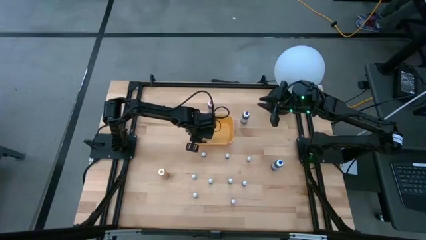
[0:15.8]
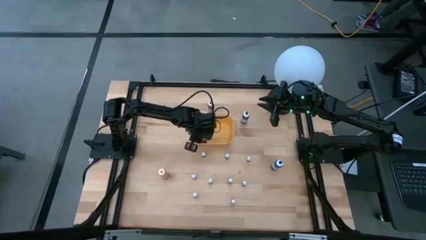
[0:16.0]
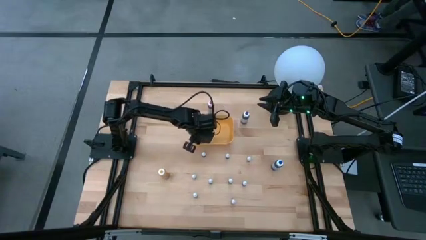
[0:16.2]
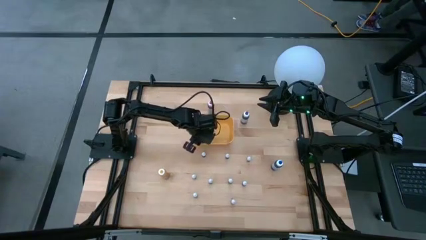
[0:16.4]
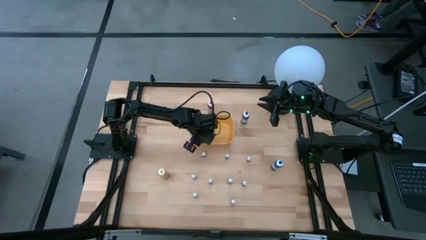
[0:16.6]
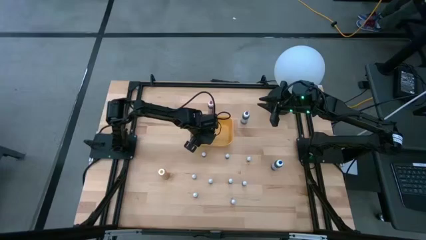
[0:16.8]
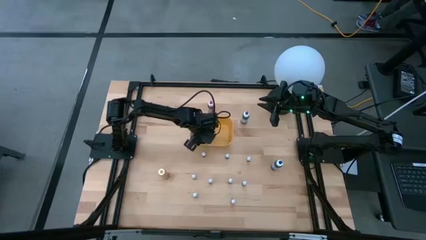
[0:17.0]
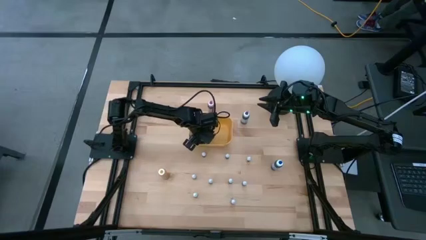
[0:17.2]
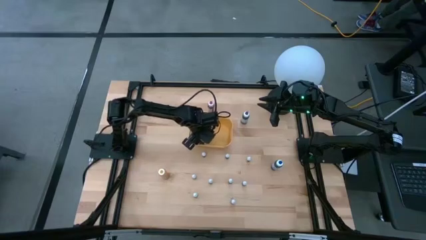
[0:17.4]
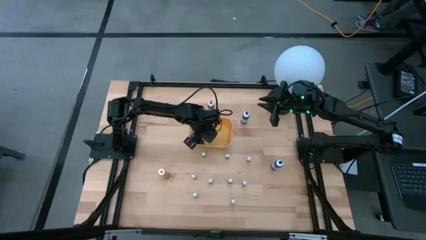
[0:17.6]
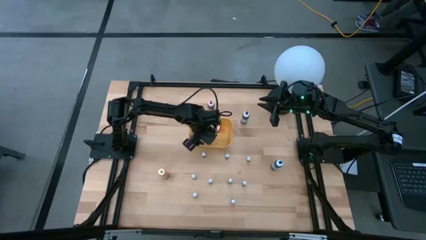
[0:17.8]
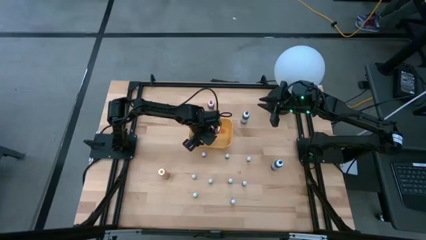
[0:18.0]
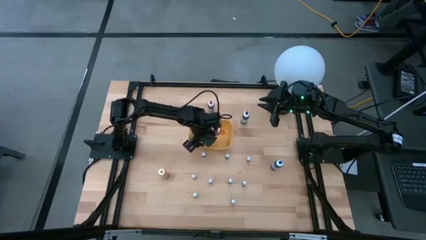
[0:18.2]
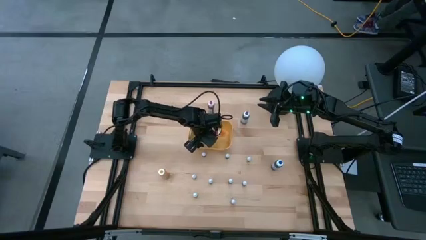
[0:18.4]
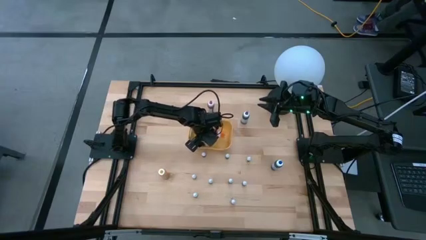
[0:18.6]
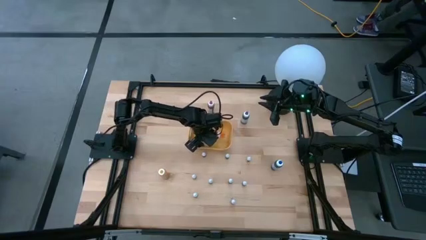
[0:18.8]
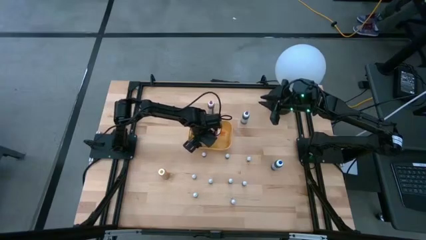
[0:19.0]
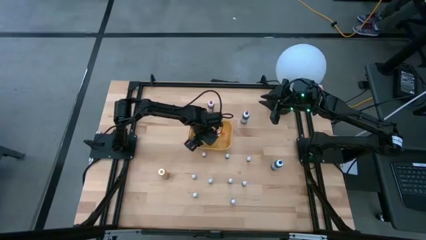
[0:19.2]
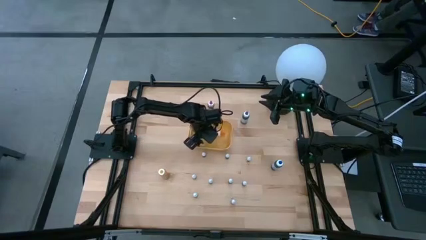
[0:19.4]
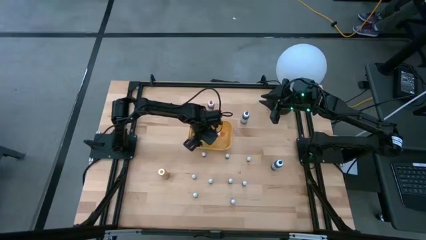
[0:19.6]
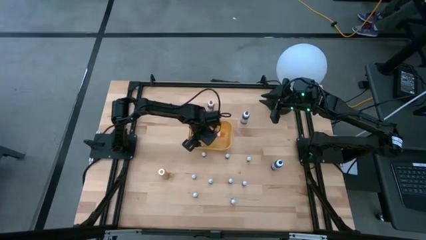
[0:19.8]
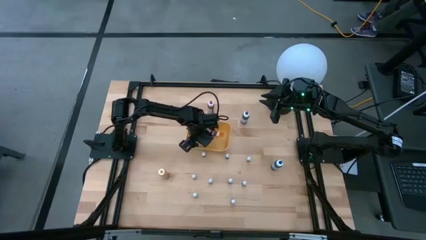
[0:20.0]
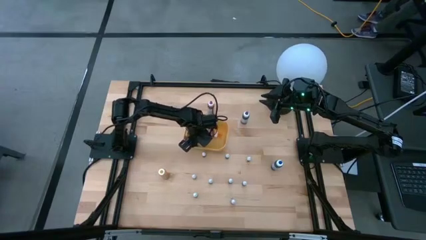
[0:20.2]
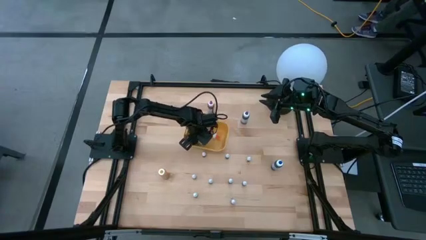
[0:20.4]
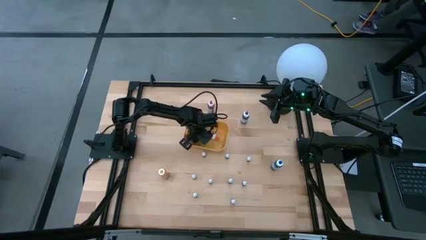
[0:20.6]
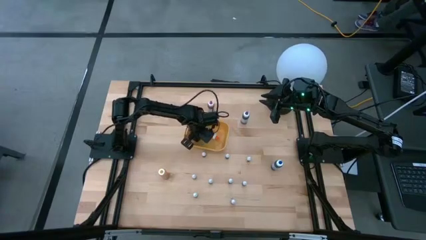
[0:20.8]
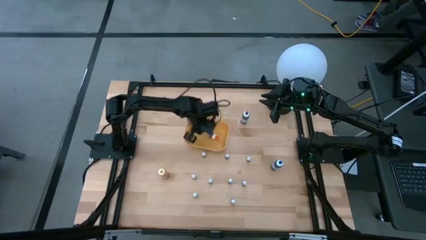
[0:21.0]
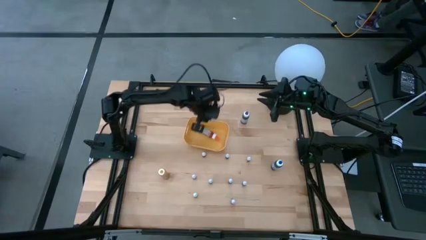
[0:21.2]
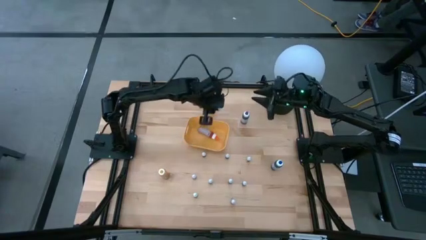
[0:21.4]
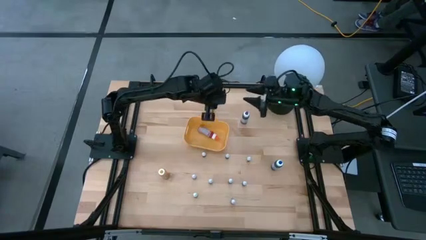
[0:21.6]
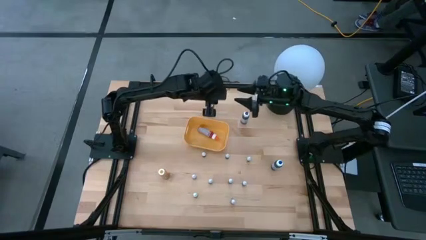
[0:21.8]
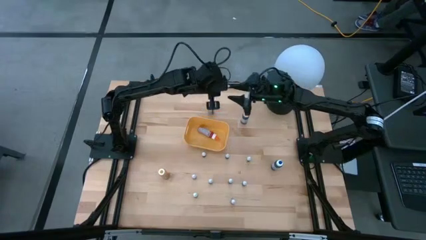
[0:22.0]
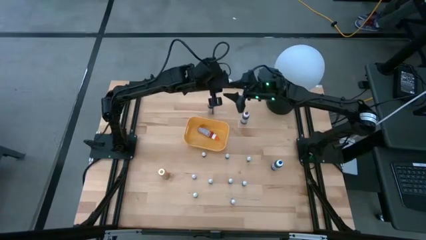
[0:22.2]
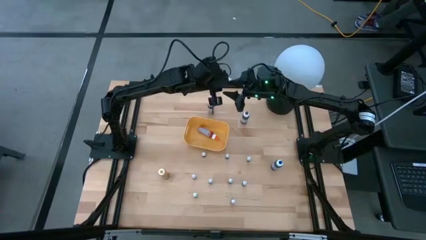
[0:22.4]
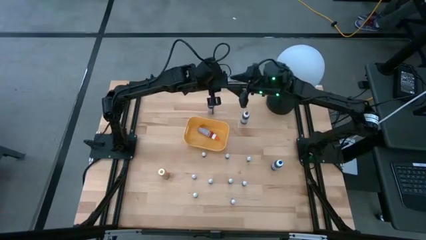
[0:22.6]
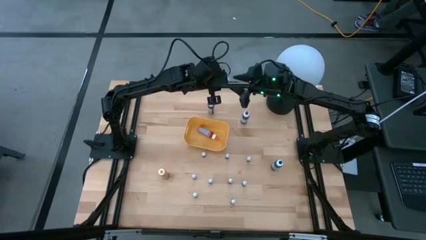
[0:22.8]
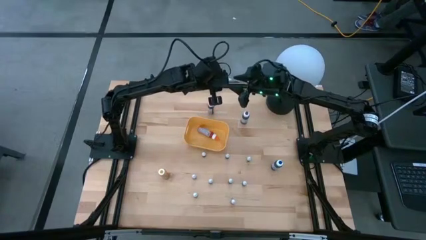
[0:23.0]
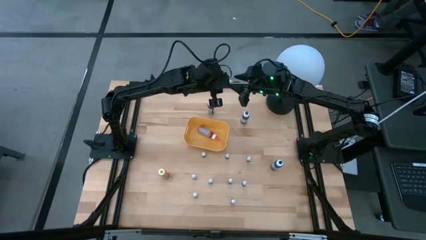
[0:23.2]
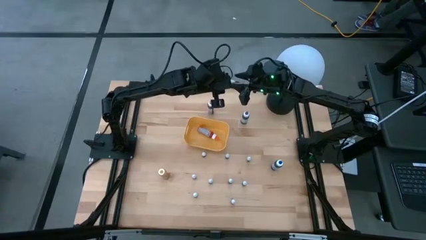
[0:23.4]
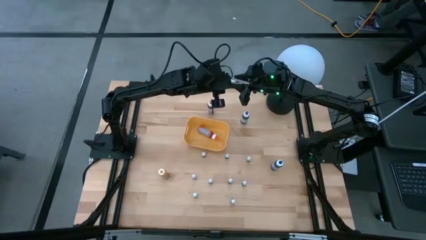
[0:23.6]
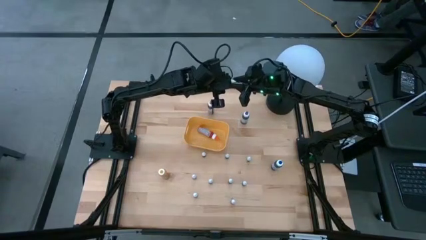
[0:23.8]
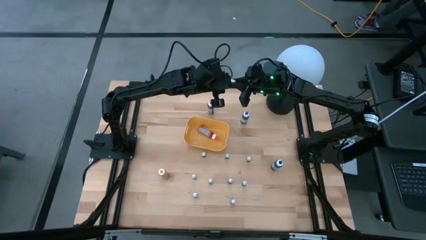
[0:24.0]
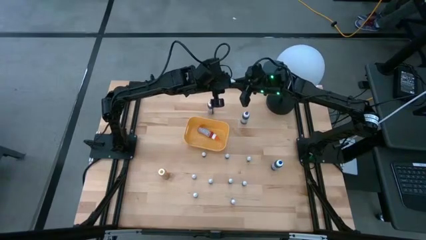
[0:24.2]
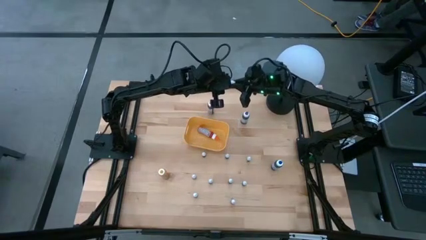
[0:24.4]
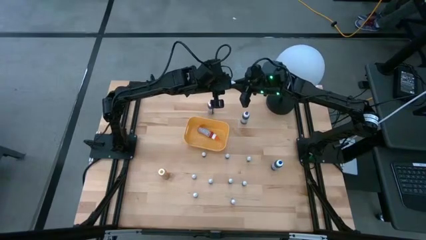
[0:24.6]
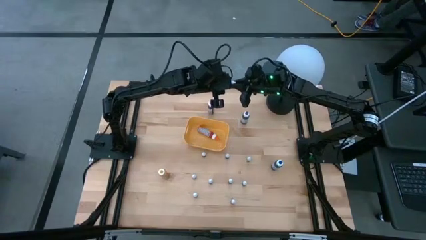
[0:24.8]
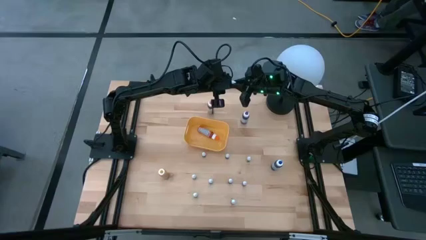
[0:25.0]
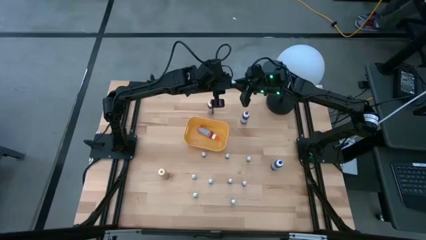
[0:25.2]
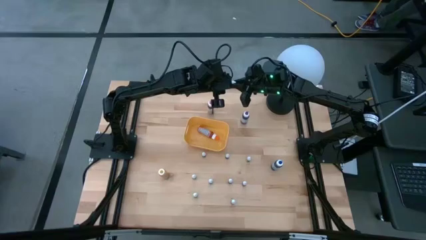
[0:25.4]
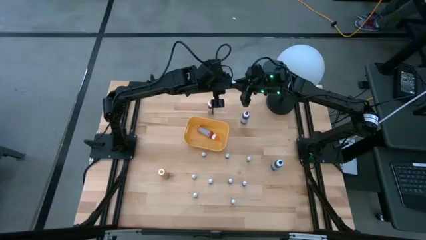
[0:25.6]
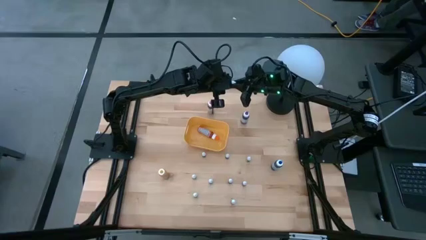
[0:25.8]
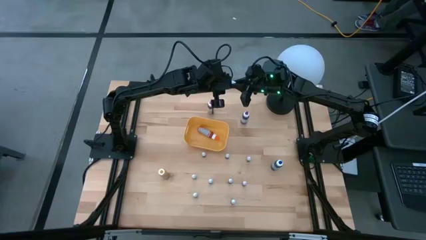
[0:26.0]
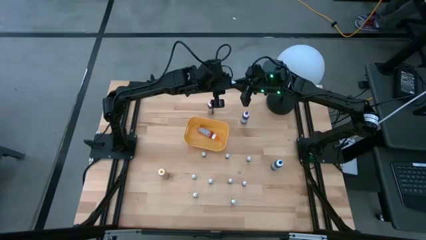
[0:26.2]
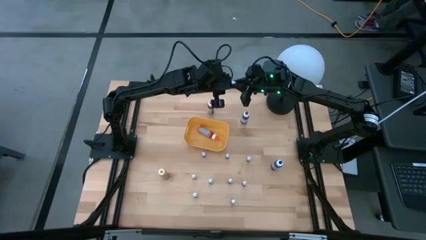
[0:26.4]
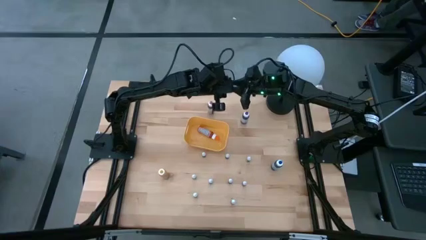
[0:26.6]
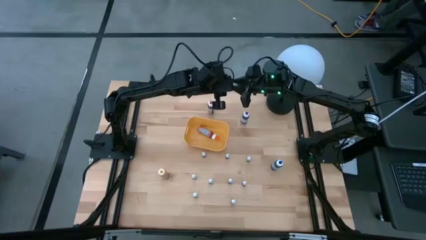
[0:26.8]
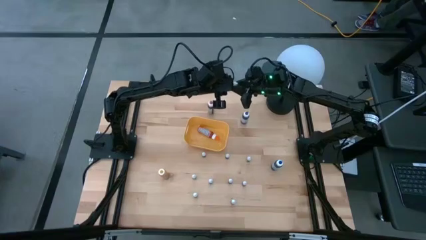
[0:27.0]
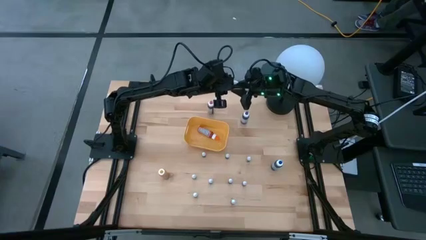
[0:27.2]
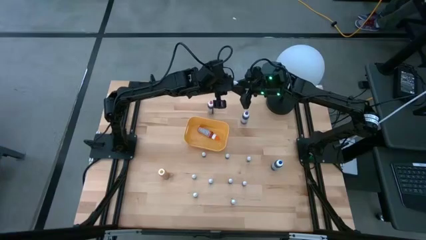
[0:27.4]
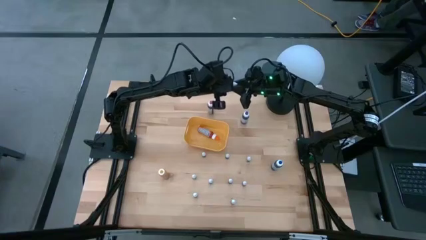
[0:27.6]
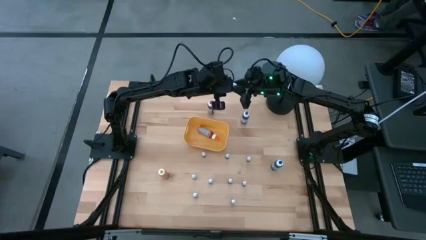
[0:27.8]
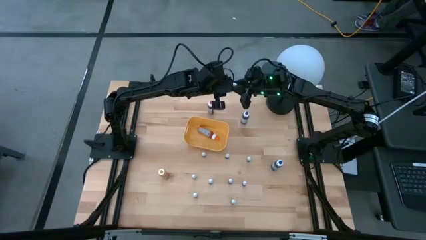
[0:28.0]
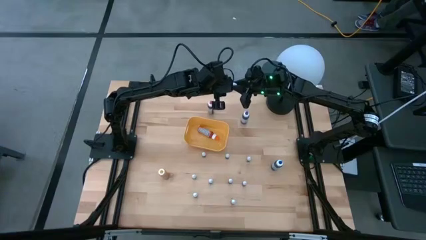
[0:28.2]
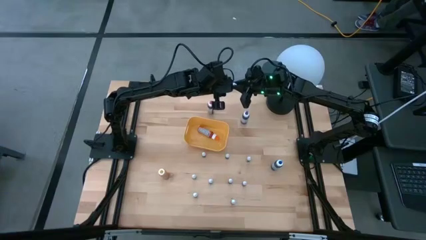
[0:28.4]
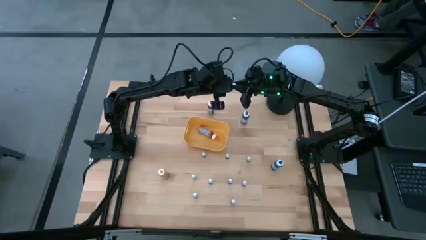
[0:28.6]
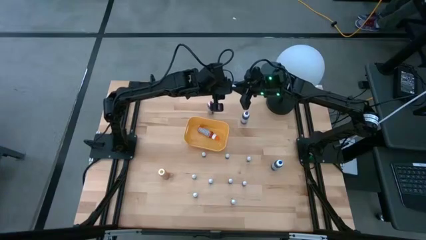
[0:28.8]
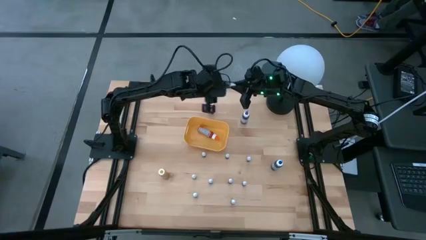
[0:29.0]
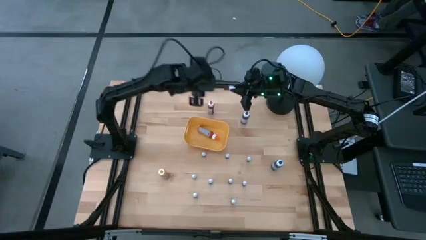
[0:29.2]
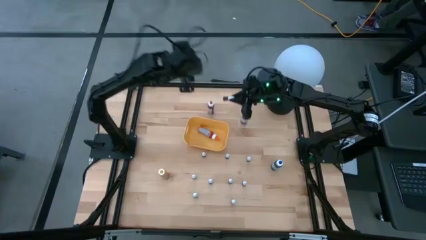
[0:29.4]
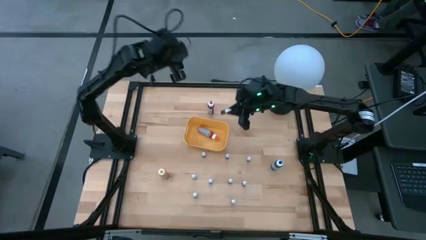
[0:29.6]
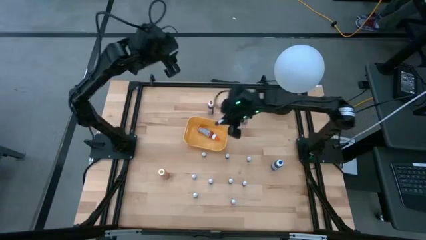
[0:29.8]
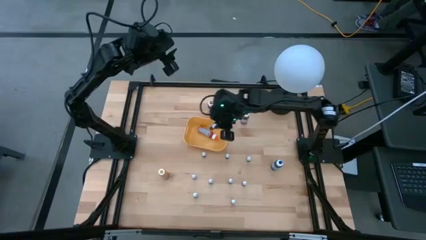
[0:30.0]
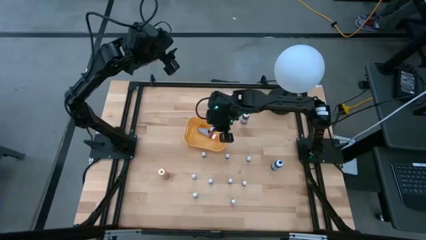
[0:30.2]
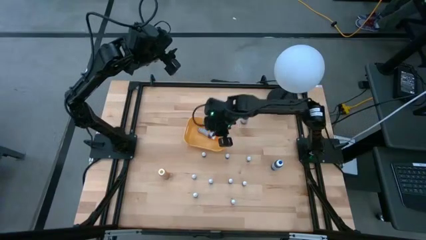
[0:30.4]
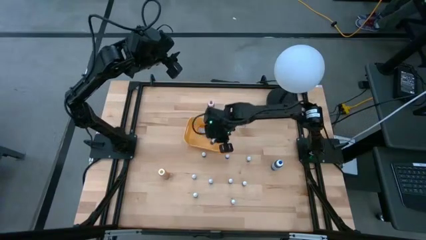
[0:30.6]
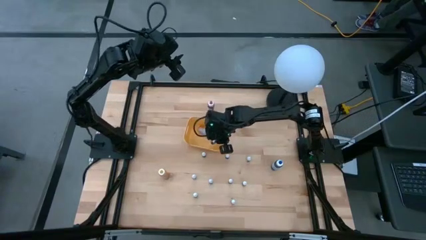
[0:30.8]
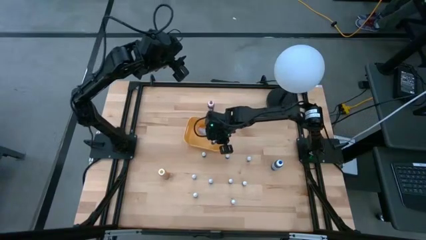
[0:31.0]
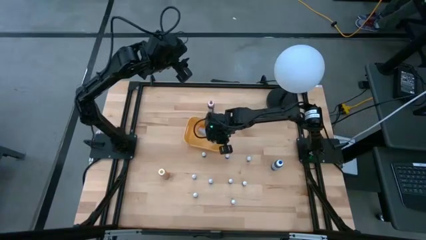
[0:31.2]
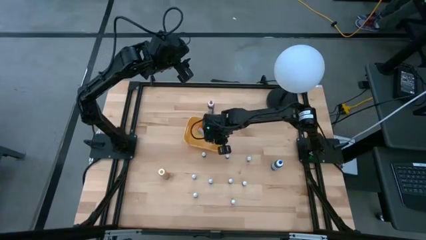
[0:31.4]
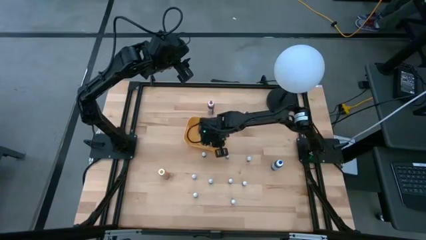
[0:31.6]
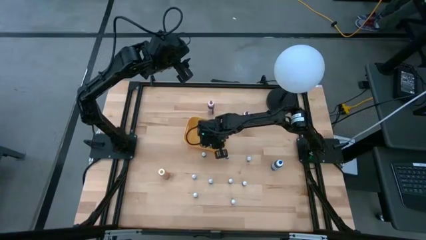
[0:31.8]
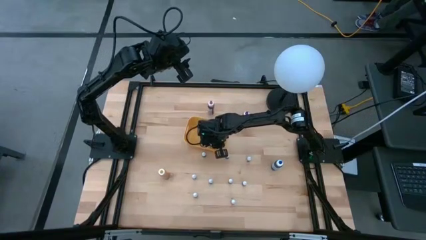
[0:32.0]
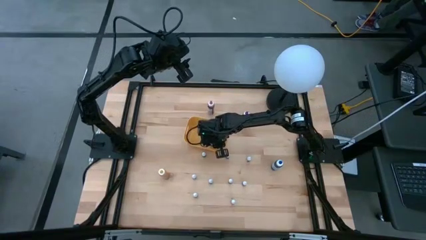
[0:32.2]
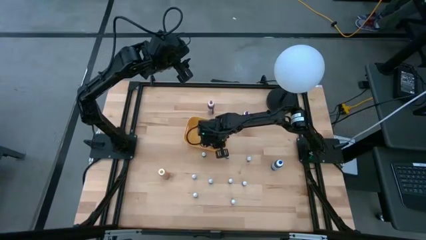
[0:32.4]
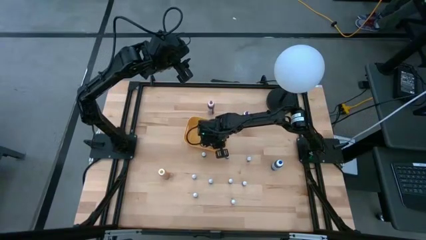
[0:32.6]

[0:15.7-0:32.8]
Task: Pick & Place food coloring
Adjust the small red food coloring bottle in the yellow bin
